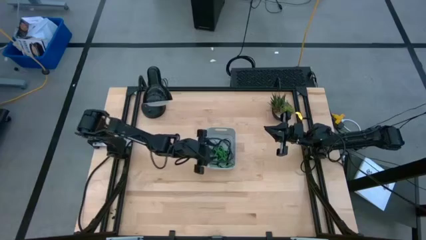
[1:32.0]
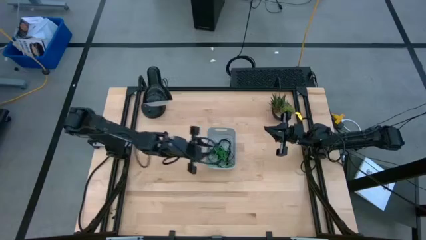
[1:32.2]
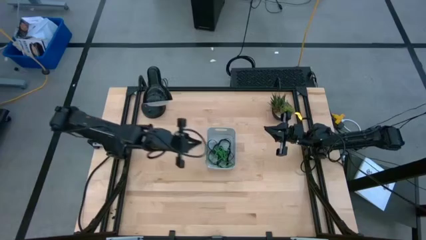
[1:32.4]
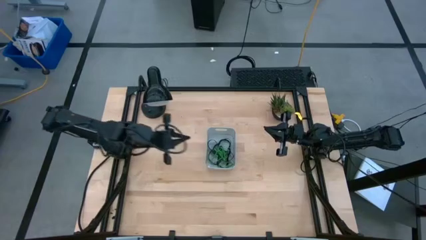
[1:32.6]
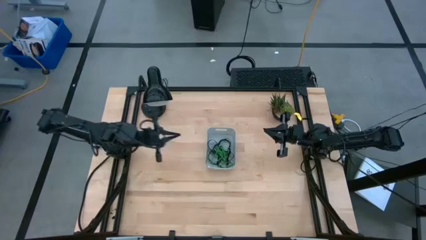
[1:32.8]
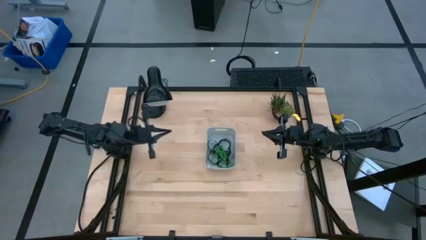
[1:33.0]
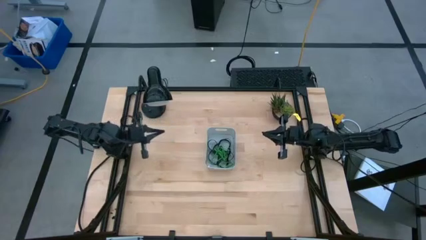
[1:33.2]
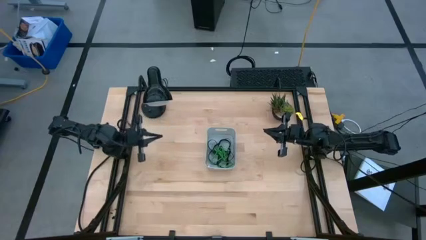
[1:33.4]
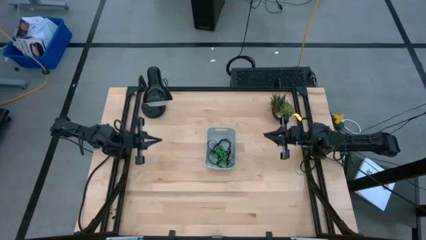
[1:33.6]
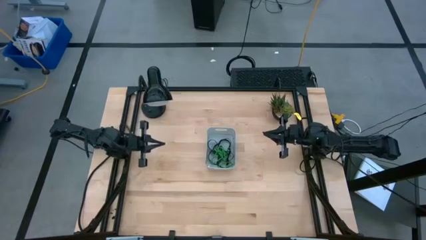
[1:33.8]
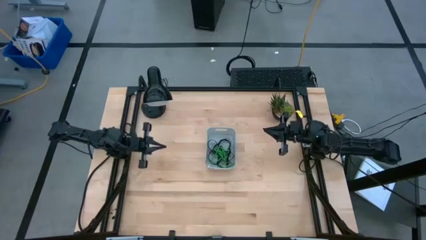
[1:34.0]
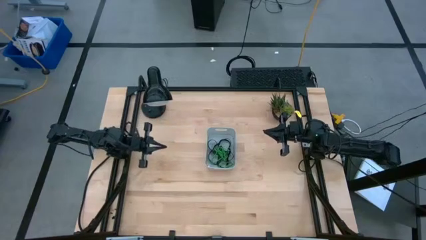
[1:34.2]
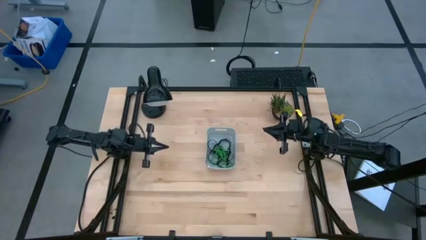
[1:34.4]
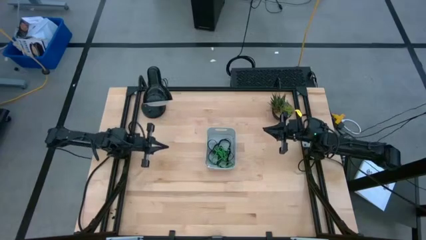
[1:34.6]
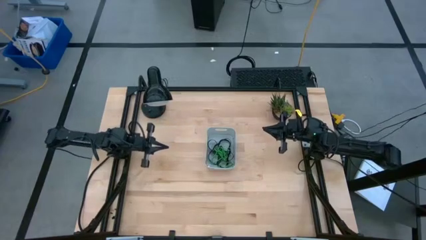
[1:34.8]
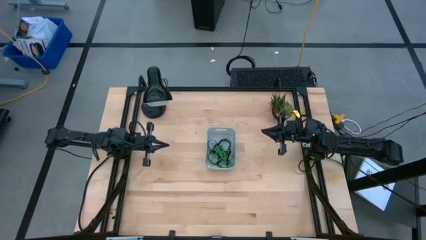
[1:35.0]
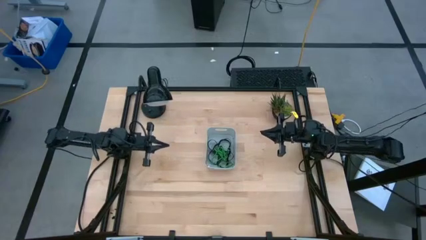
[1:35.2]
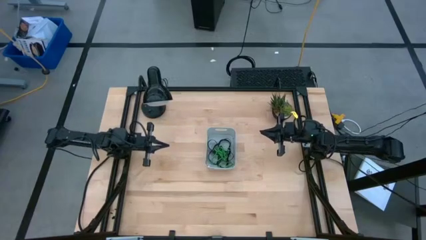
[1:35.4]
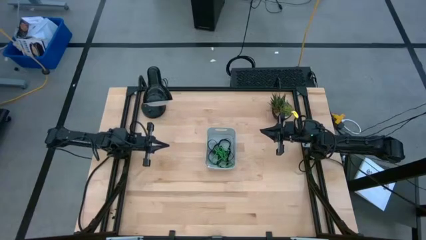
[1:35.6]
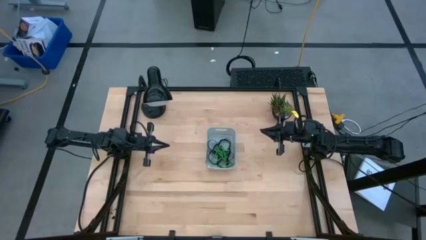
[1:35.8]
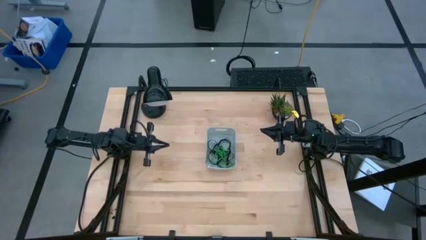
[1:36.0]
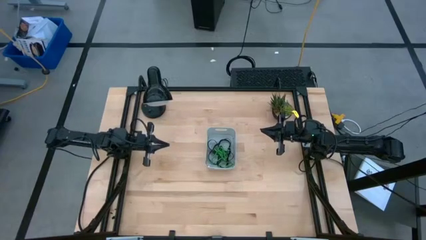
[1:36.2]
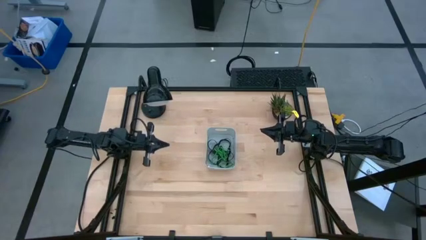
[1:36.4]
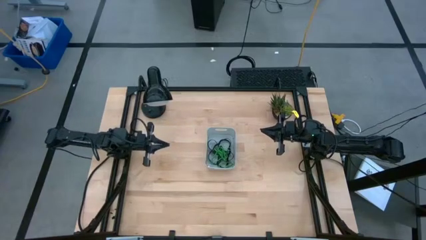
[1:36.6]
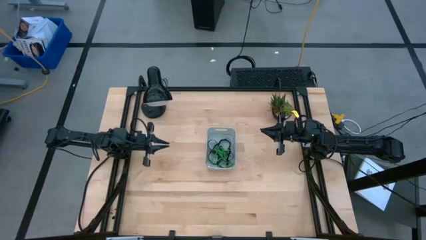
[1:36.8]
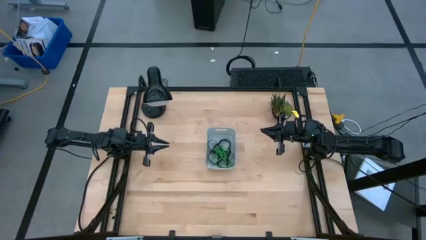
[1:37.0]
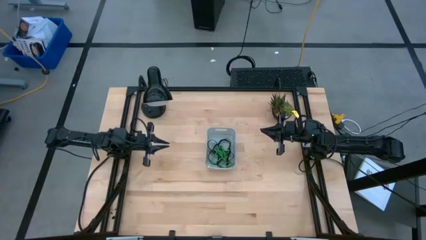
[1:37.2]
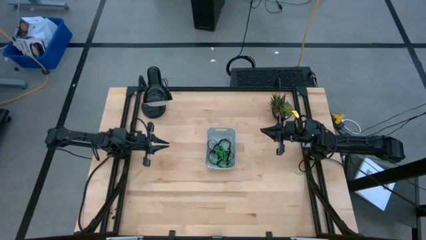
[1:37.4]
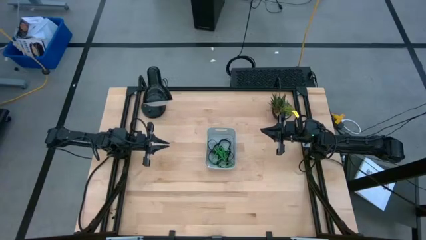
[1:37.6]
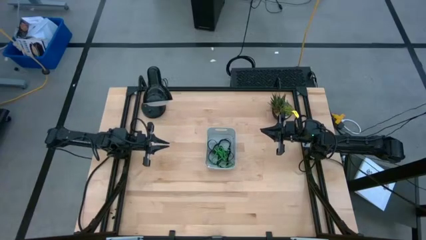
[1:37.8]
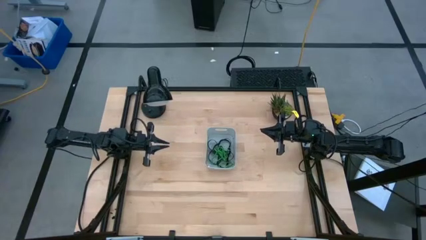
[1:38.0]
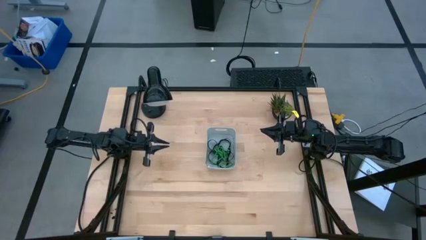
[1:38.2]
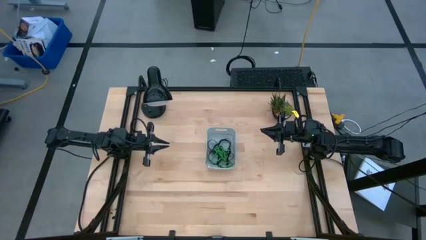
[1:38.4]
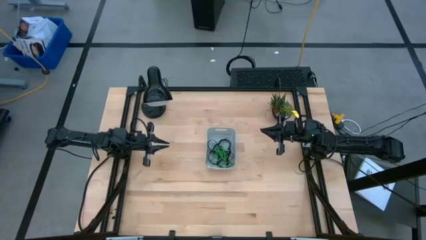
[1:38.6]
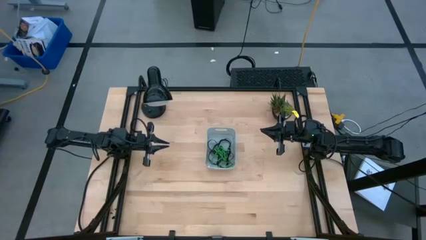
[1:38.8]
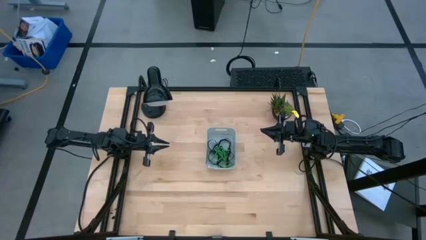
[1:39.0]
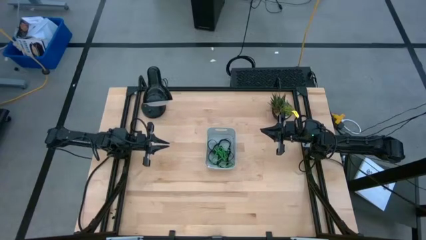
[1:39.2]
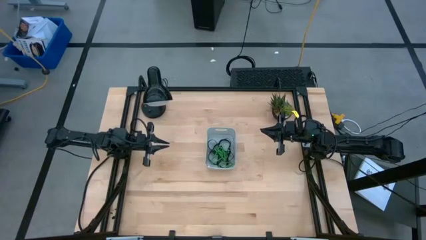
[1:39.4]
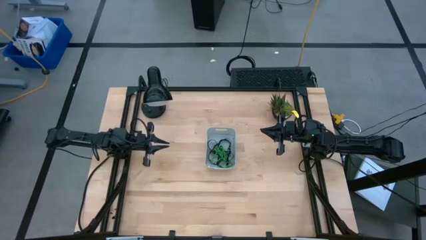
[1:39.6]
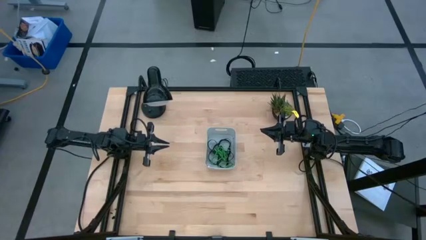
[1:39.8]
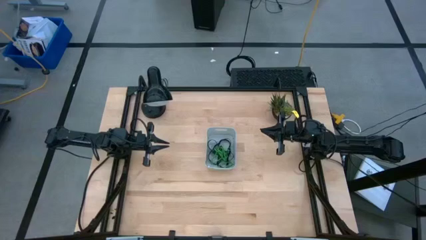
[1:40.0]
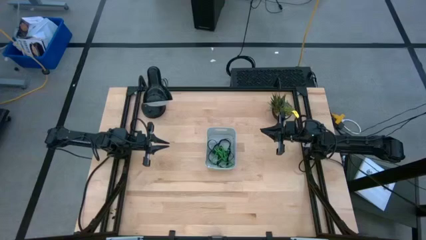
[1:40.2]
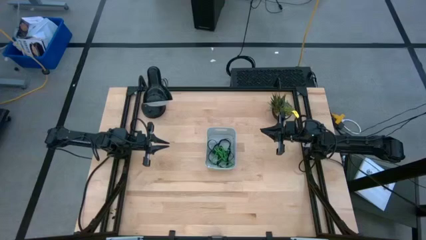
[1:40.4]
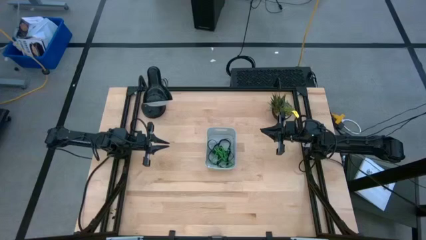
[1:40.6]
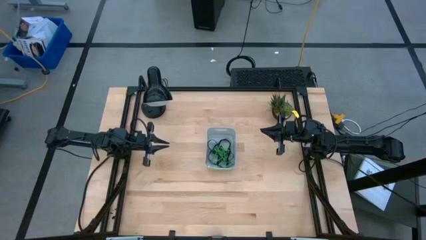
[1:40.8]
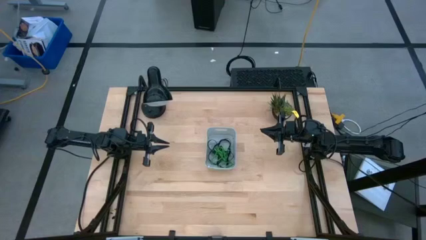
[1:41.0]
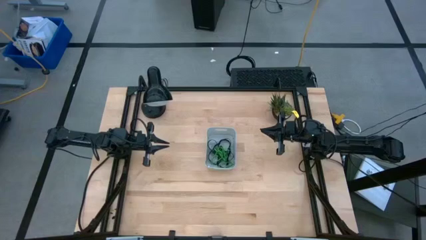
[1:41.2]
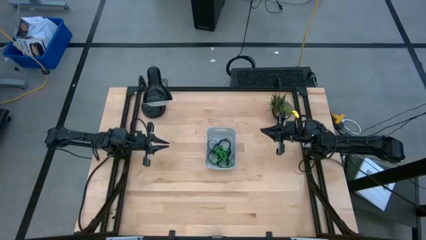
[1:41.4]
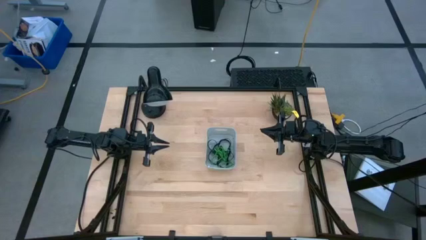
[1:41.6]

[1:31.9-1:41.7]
Task: Pick and place rubber bands into bin
Return to Home Position
